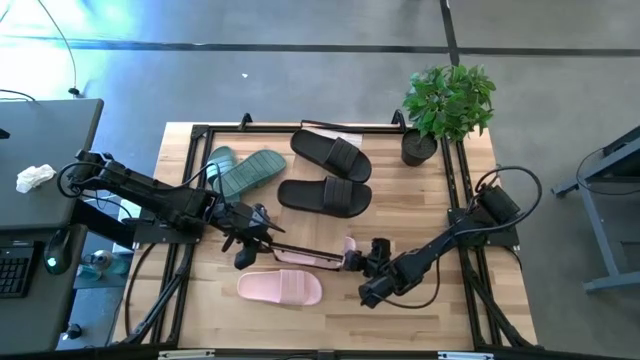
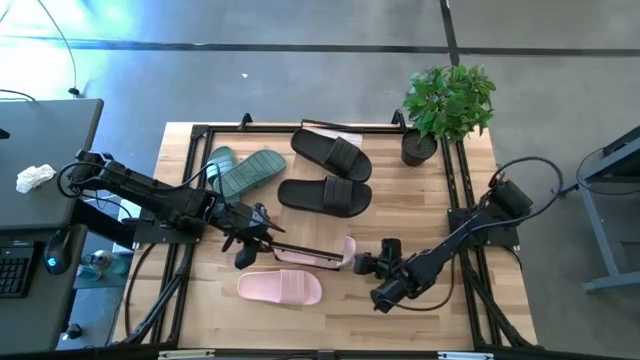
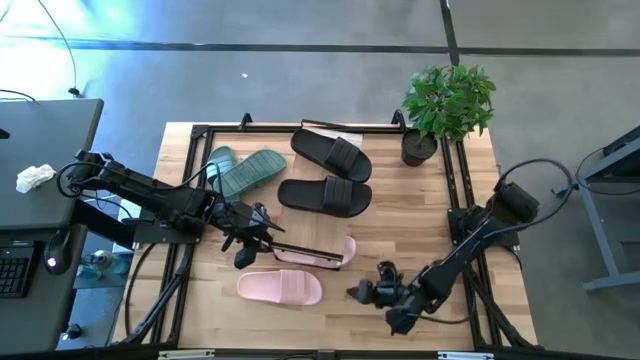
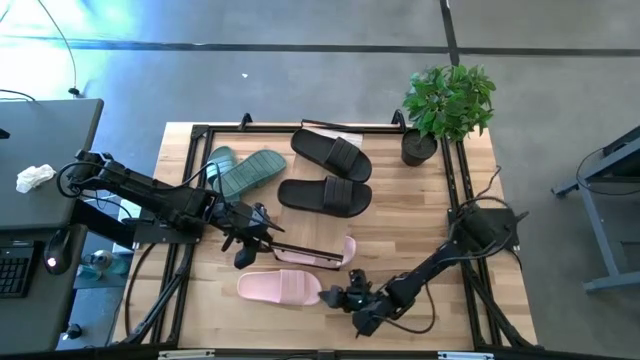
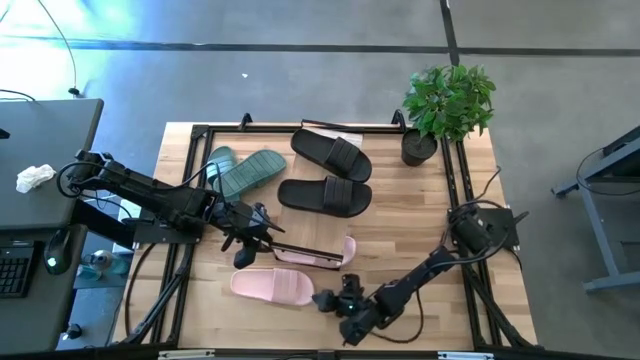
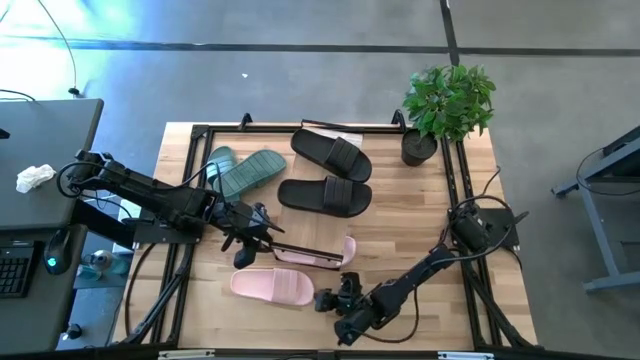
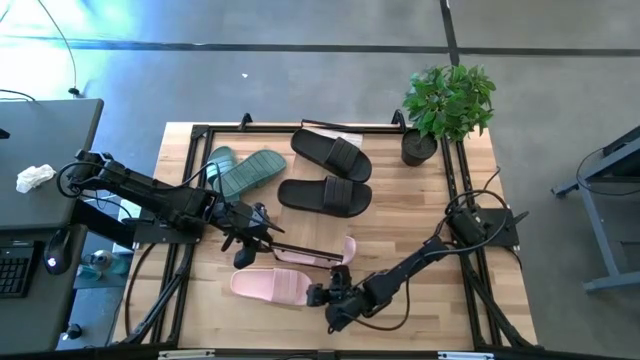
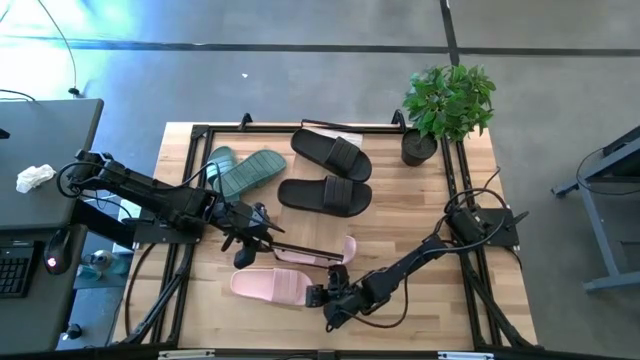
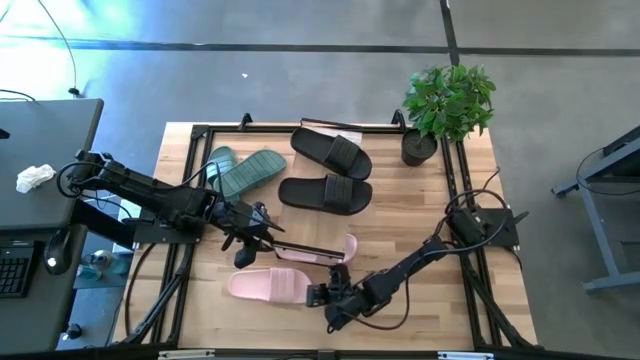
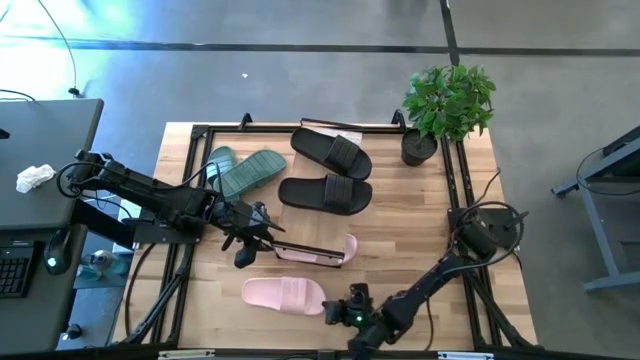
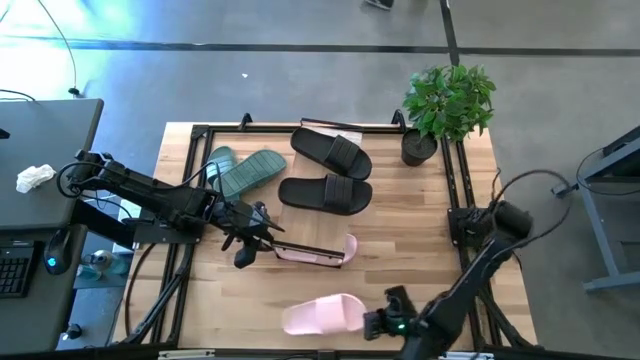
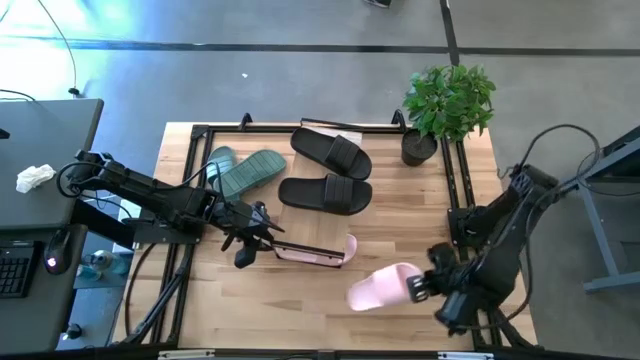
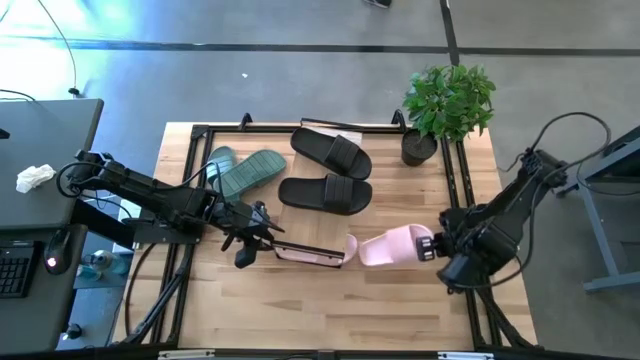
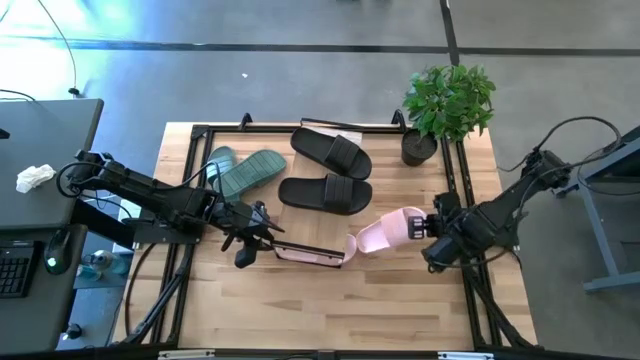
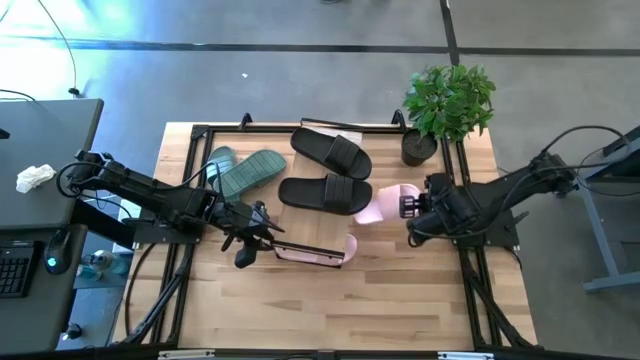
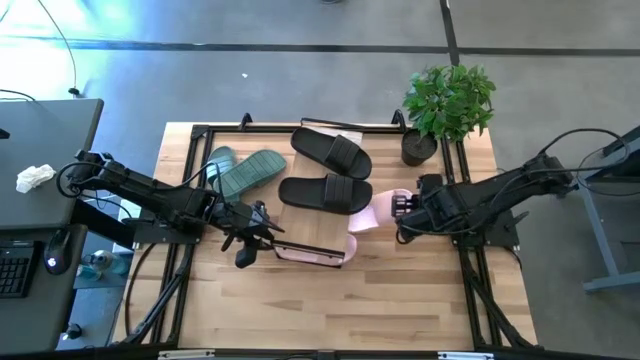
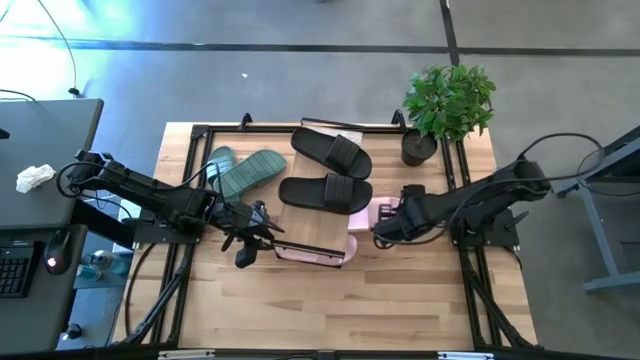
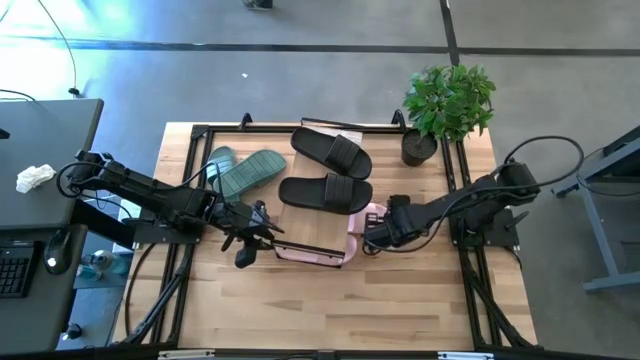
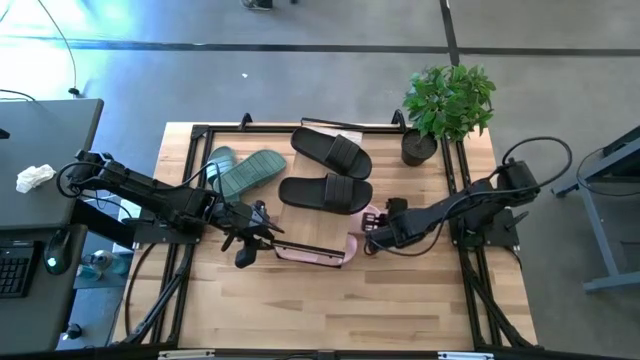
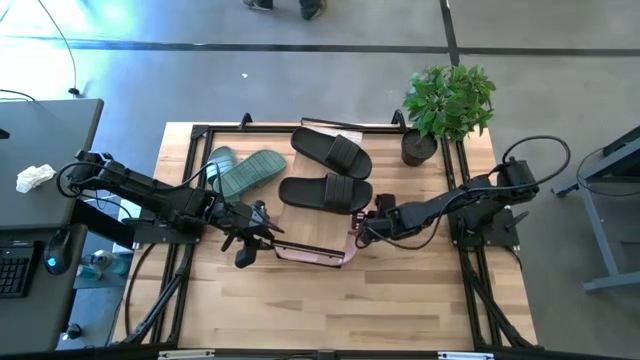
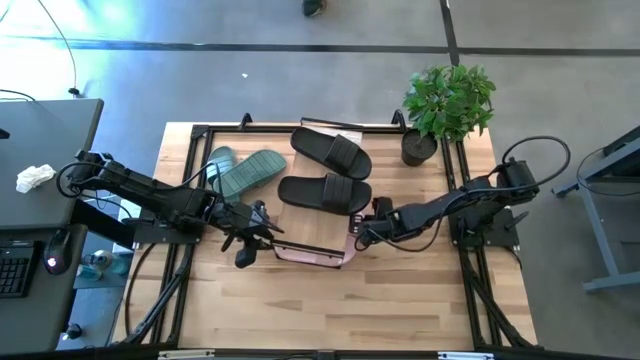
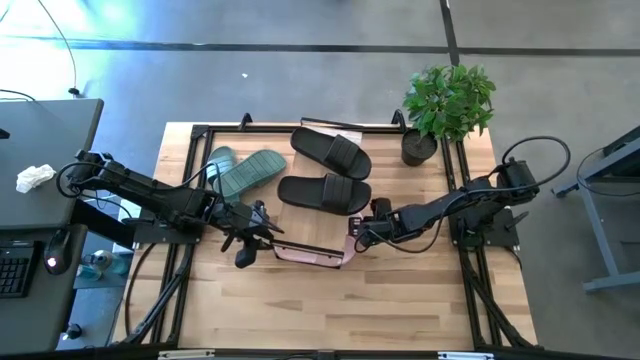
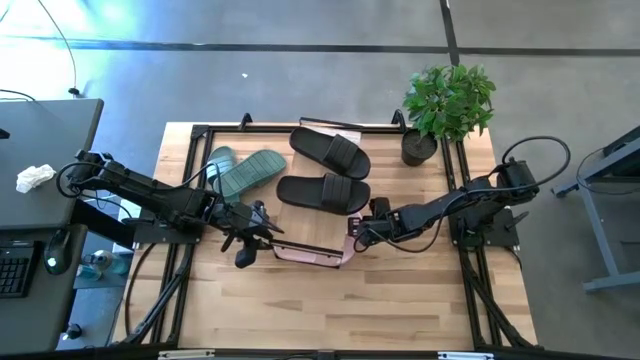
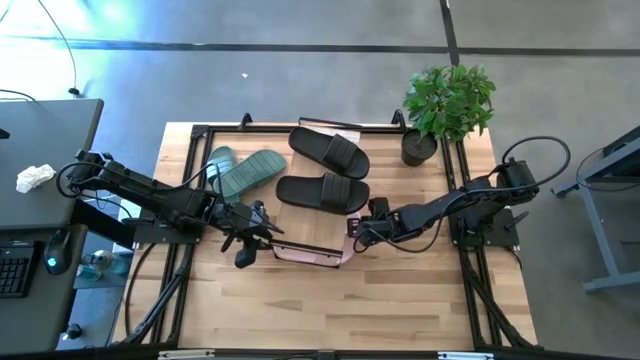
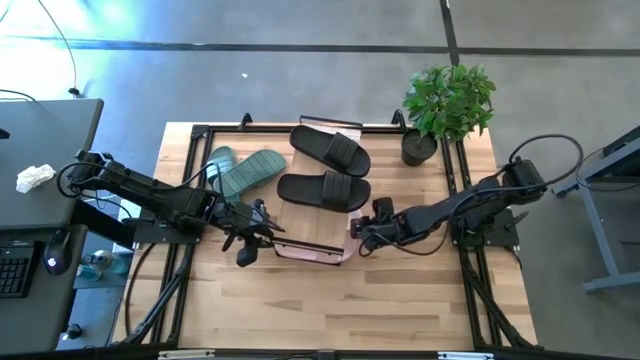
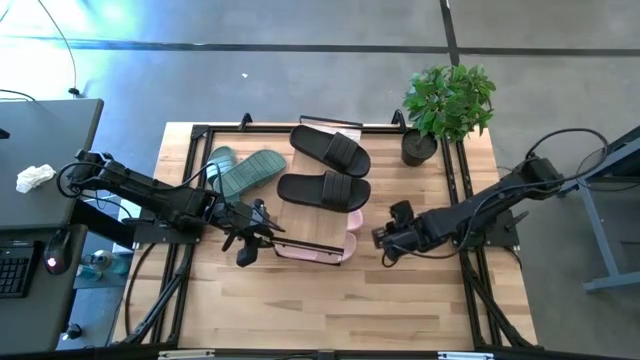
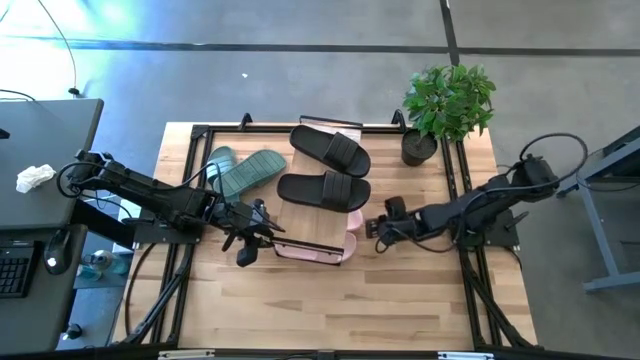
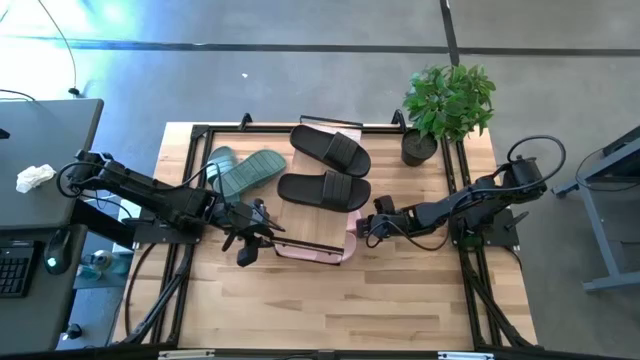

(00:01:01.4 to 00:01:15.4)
Task: Pick and place slides into the shelf
Put the pink slide under the shelf

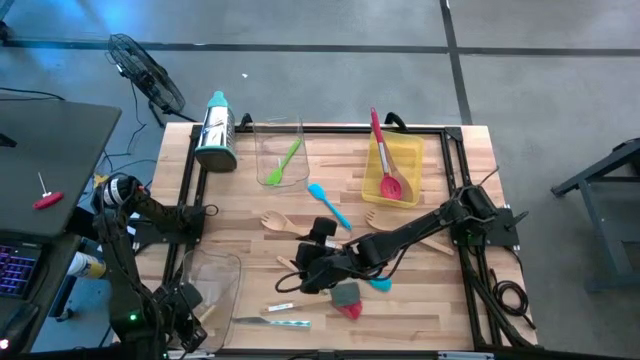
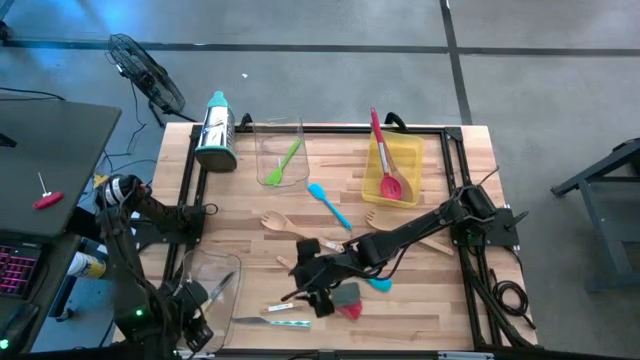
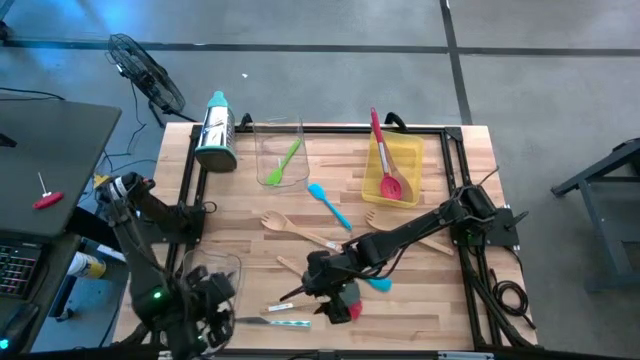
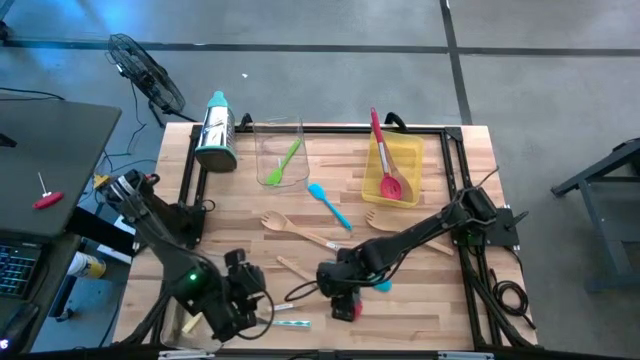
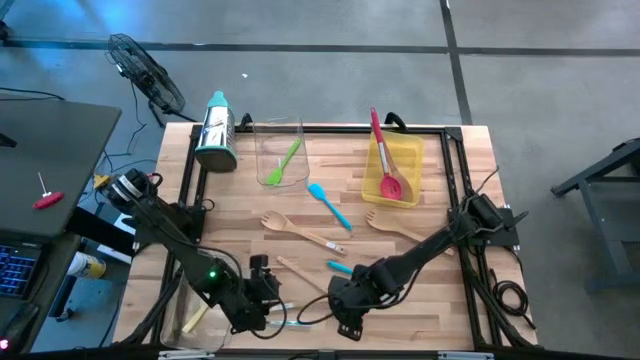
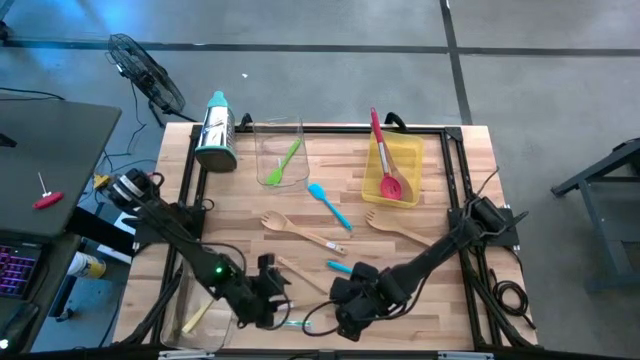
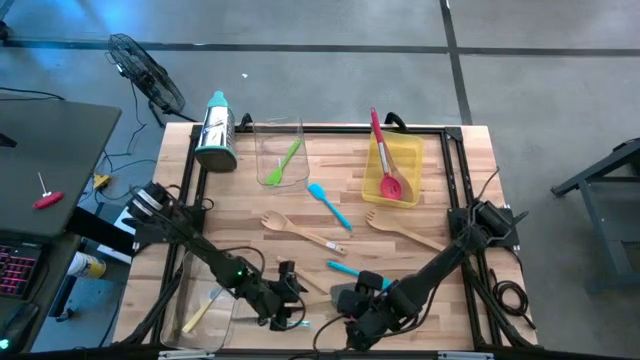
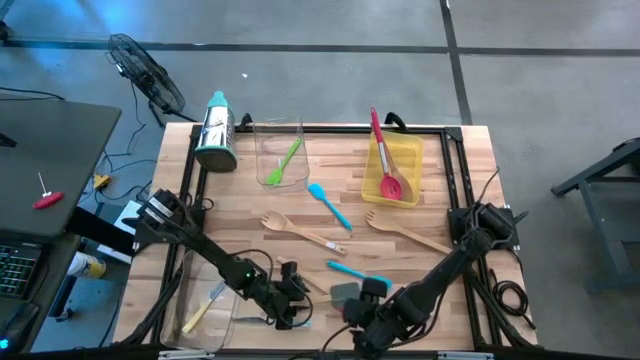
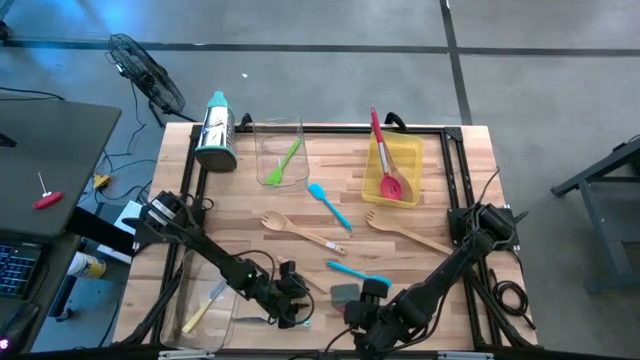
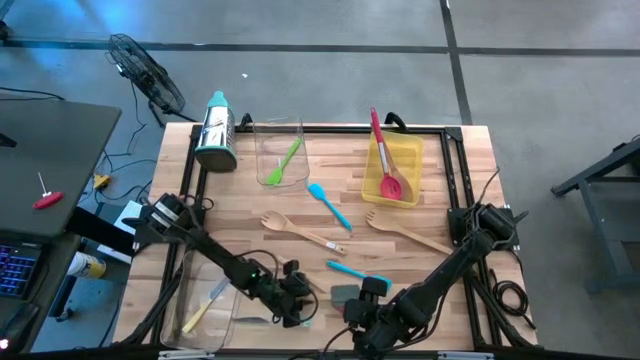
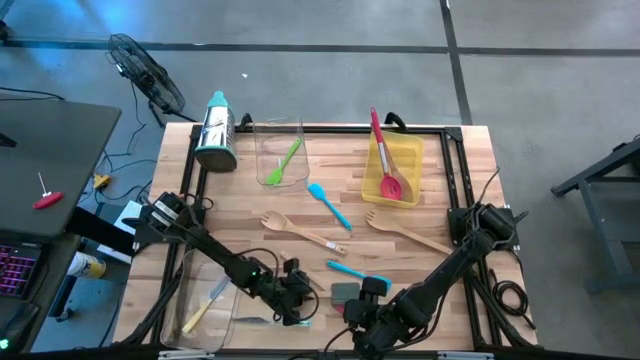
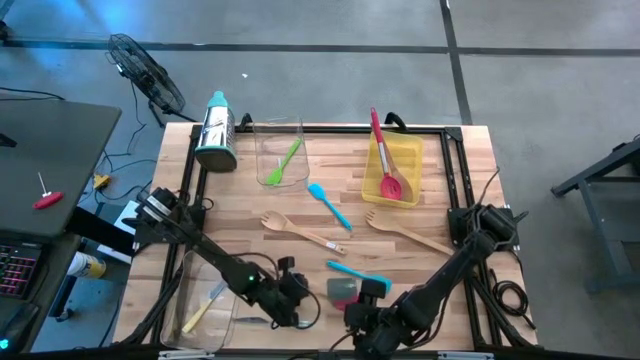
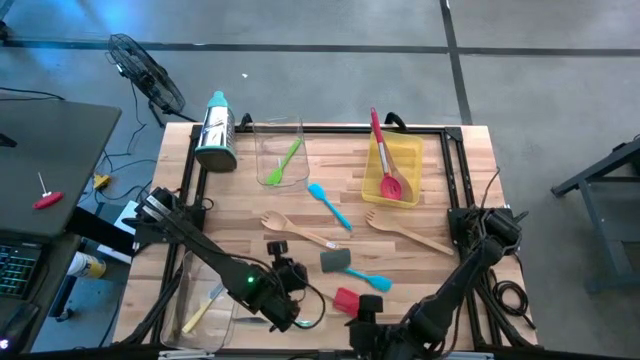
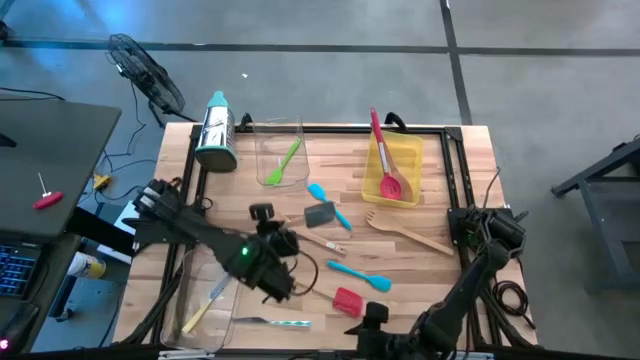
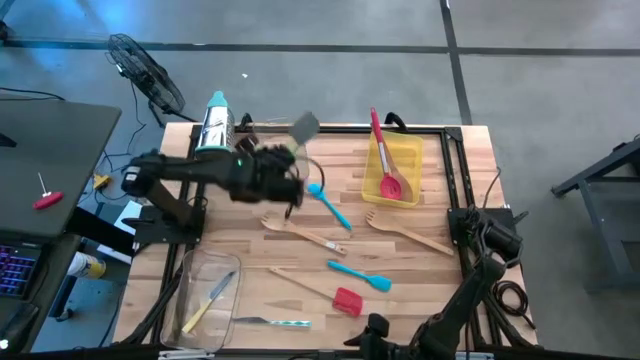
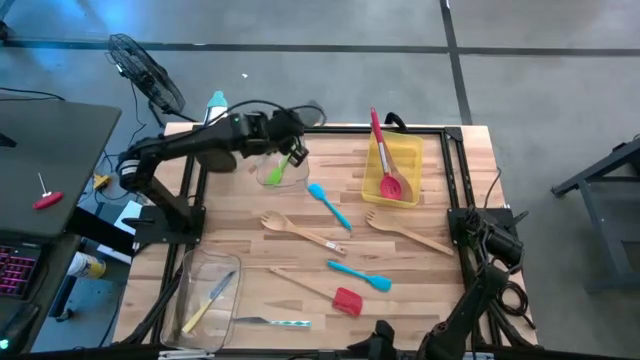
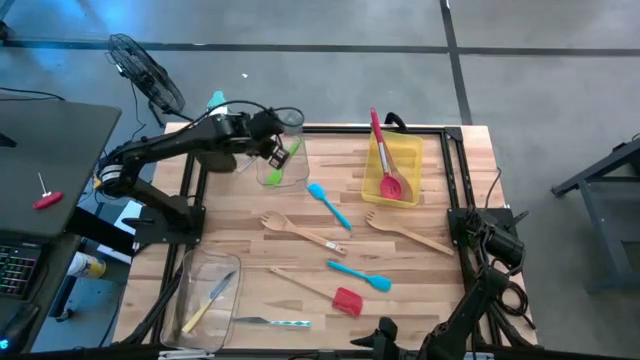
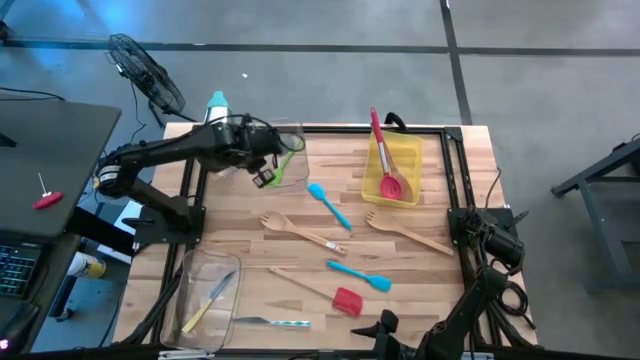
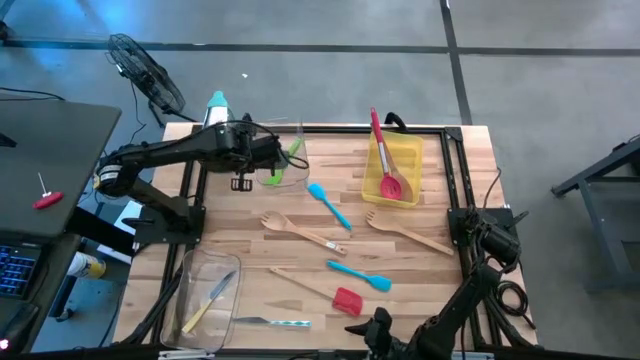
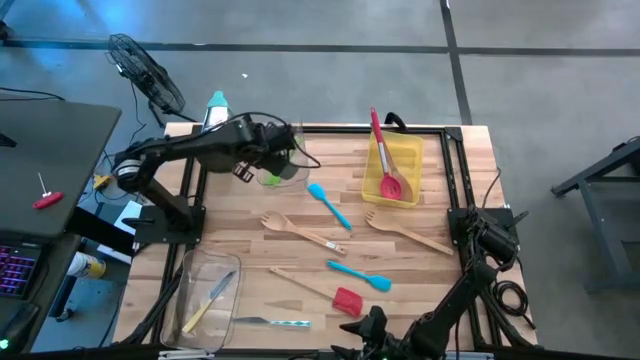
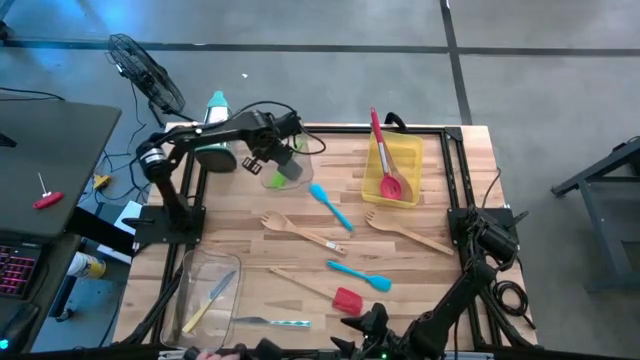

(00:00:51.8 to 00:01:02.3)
Task: Pick & Place Kitchen Items
Put the gray spatula into the top transparent bin
